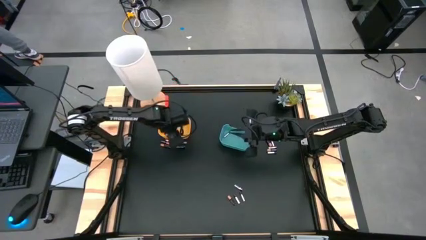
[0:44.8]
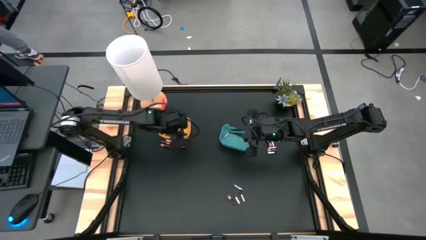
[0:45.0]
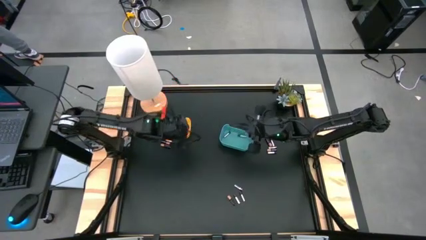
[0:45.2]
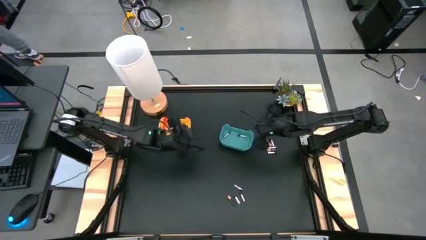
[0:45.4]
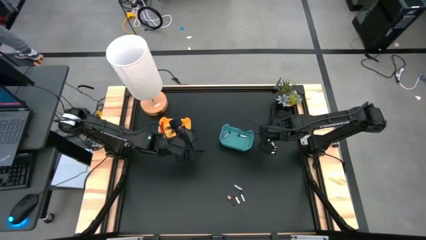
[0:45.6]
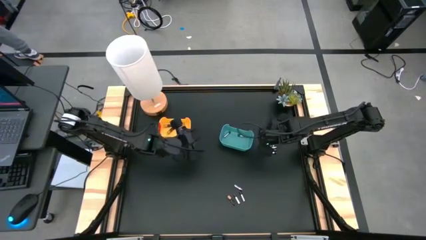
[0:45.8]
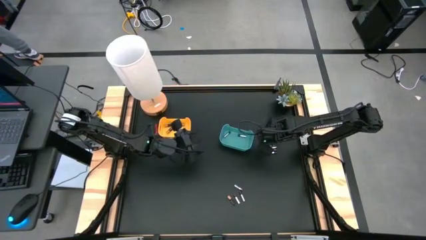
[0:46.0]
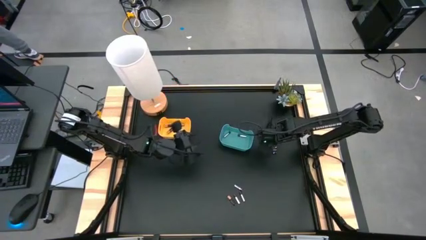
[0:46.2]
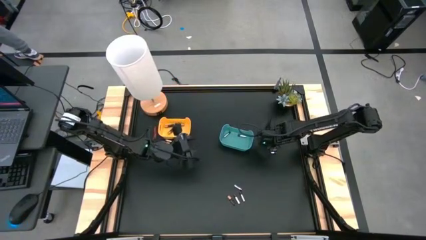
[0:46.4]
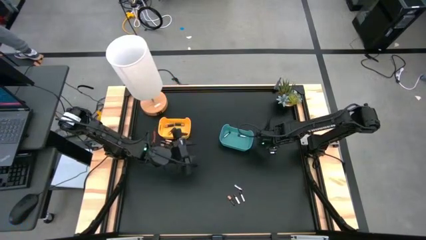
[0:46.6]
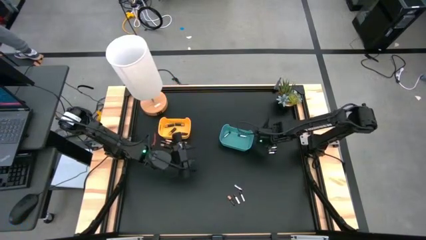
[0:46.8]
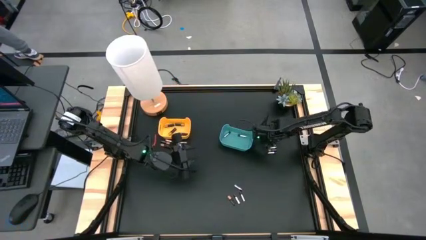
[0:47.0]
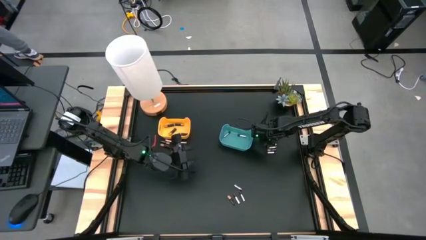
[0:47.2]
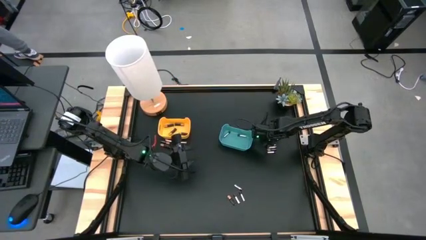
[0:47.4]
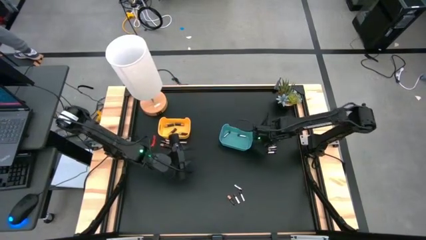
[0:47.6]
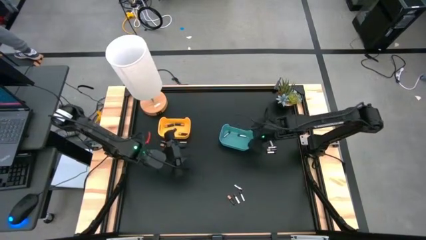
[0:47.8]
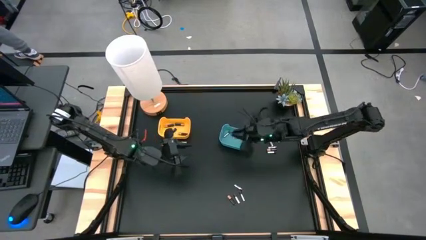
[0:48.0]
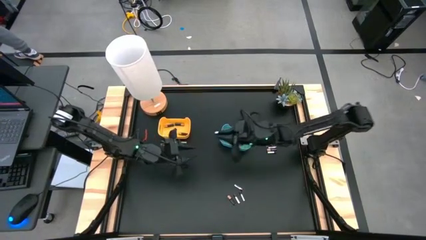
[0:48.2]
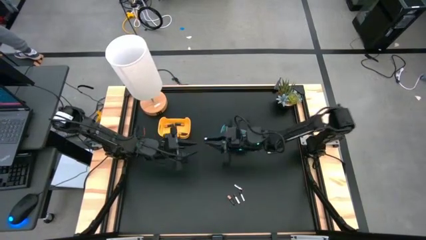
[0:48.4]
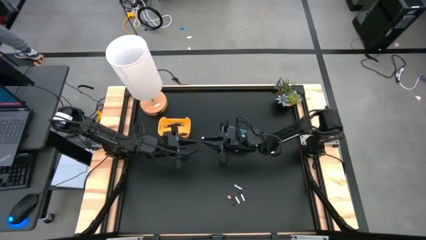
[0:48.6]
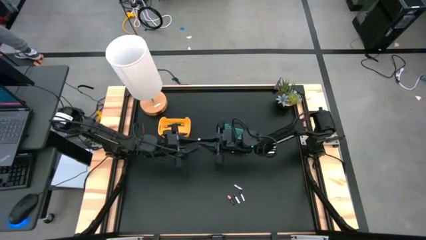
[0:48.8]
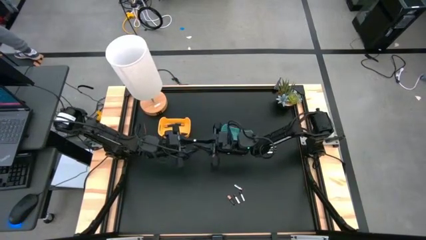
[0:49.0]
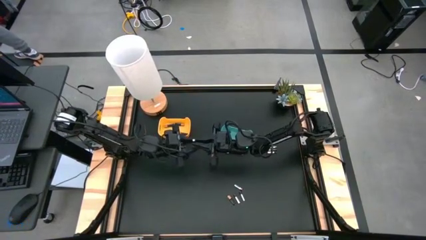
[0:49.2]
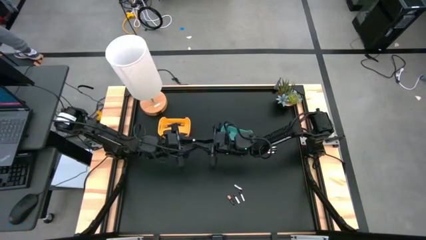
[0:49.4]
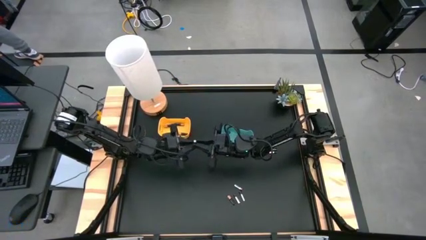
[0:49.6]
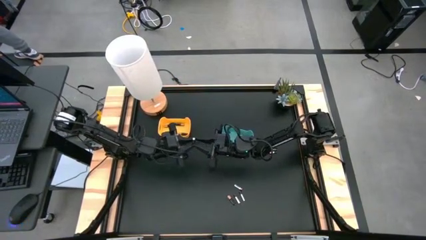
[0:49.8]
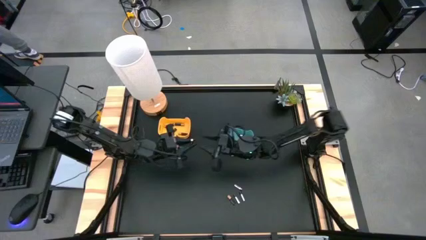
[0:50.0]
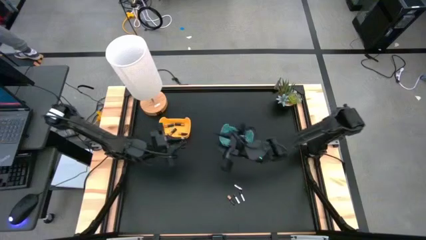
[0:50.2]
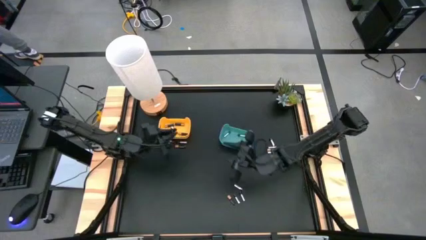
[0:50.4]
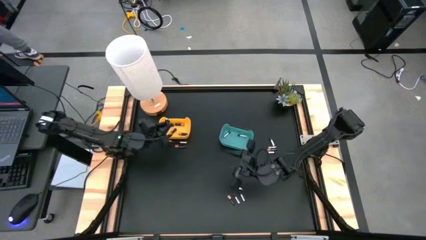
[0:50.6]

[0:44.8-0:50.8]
Task: Sort batteries
Put the black battery into the yellow bin

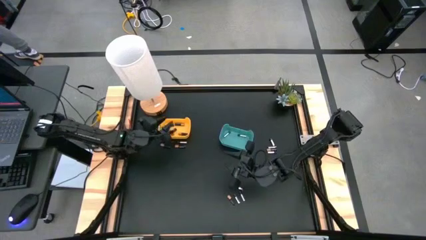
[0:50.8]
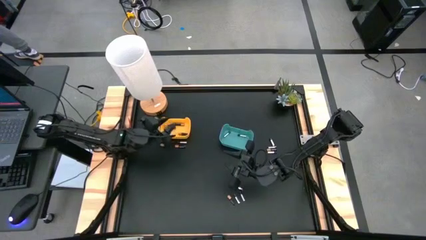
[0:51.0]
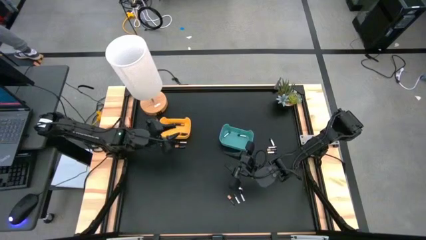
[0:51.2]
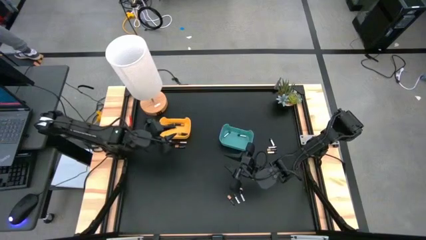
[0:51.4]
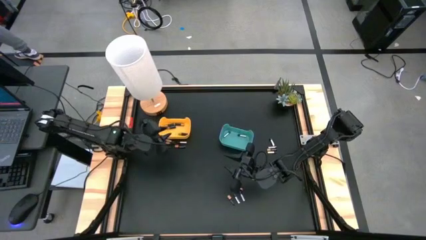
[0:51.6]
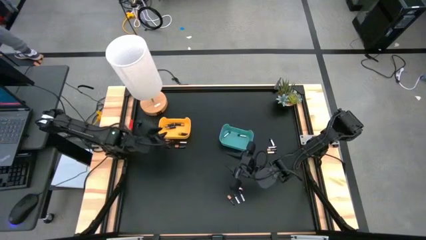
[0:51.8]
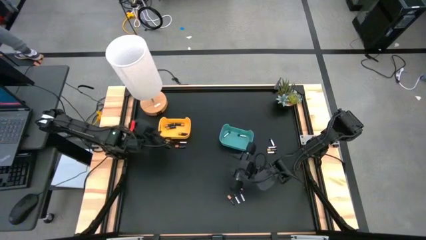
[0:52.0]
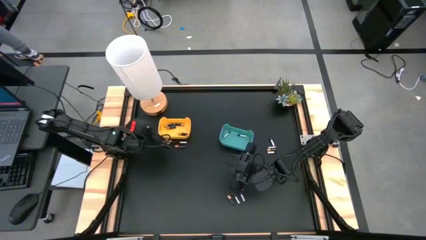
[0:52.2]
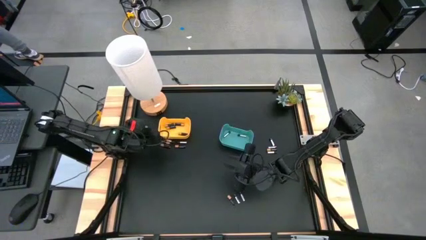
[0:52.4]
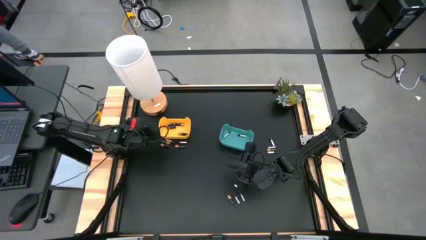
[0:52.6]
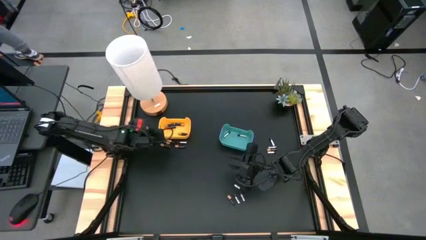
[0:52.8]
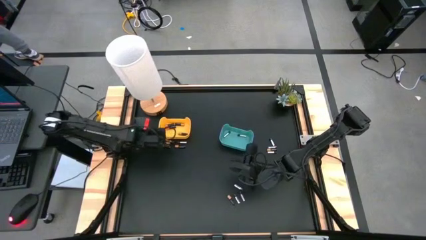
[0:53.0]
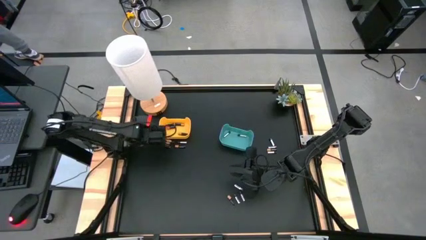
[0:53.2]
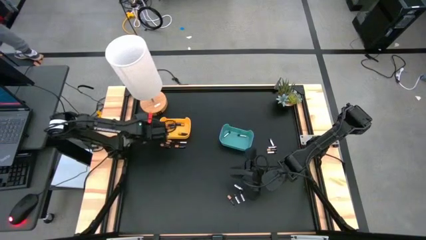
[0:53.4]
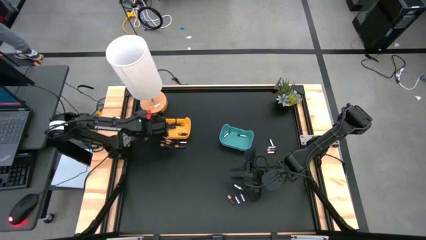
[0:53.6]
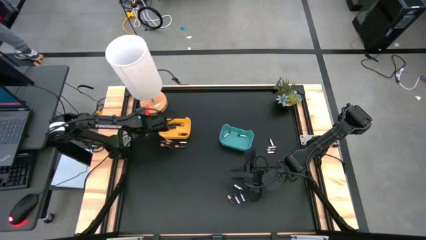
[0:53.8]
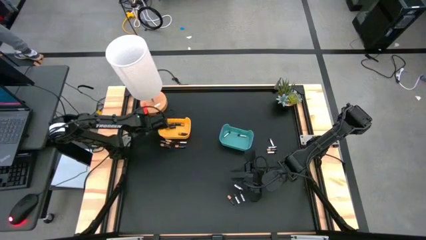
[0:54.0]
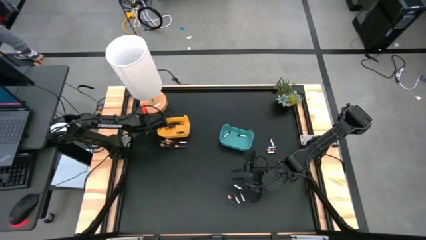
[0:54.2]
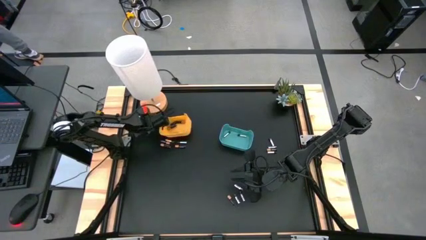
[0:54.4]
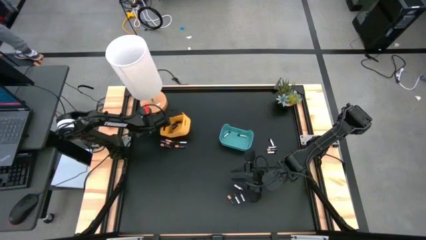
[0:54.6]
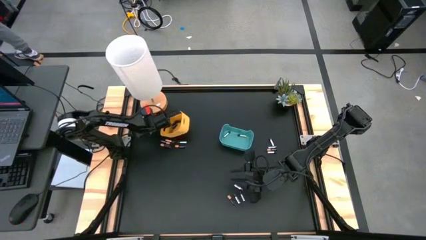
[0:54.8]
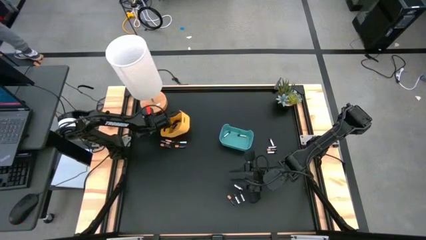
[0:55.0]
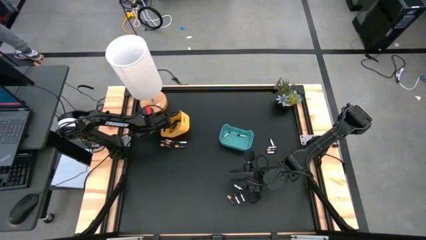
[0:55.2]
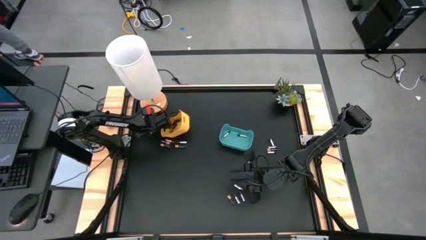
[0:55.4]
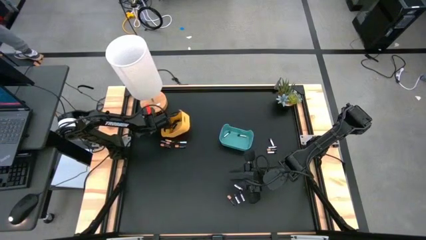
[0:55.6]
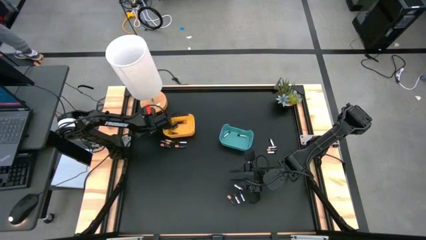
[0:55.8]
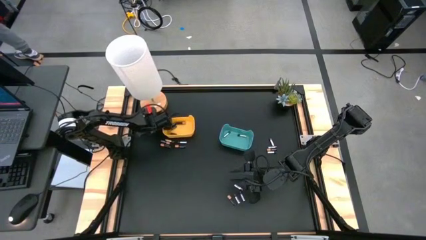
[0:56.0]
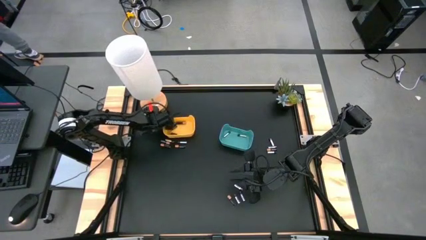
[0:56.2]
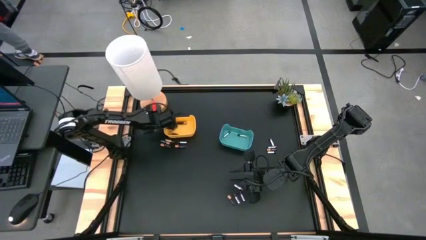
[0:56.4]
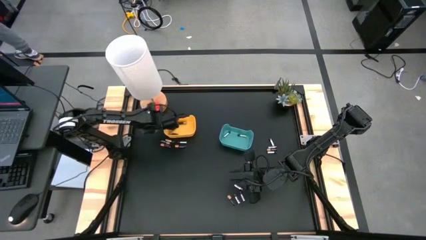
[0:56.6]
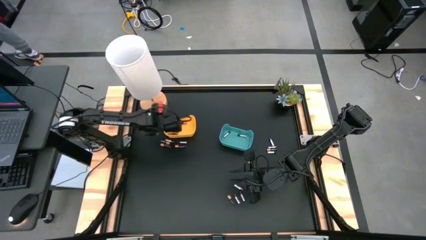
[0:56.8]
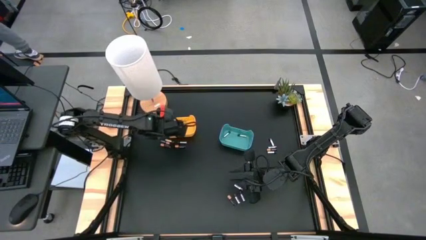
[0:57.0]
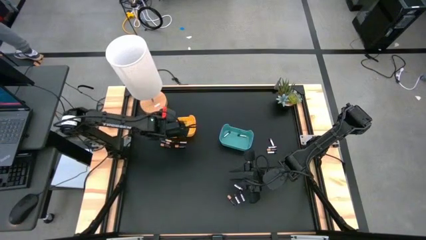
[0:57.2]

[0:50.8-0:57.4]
Put the black battery into the yellow bin

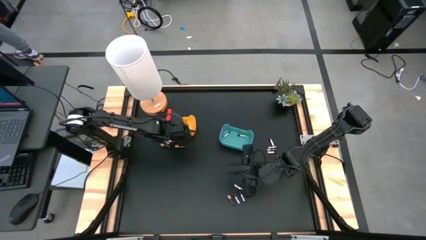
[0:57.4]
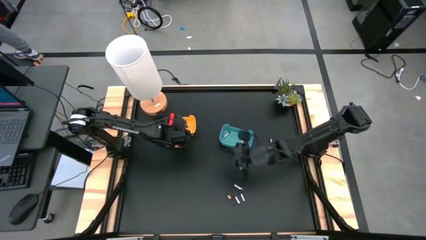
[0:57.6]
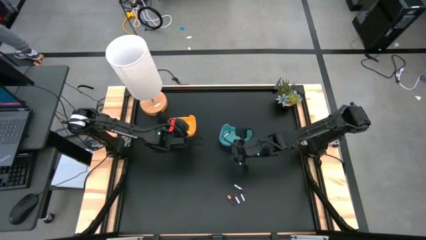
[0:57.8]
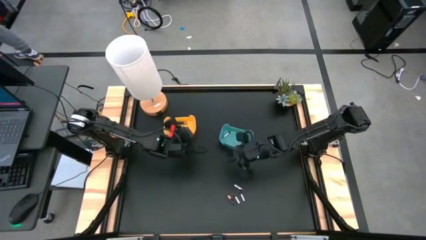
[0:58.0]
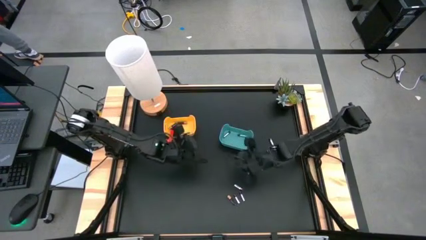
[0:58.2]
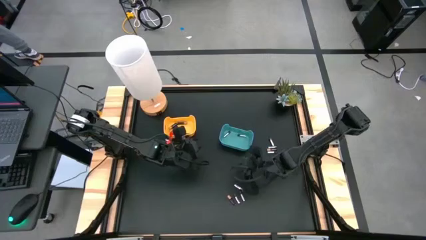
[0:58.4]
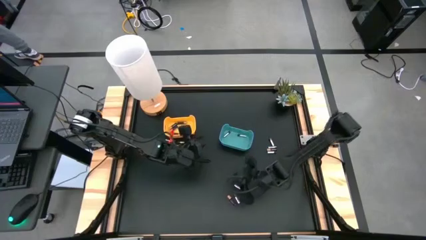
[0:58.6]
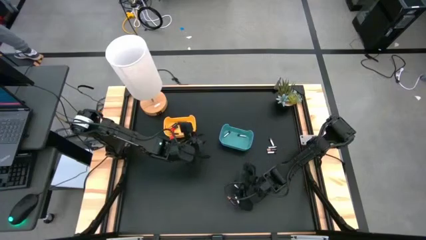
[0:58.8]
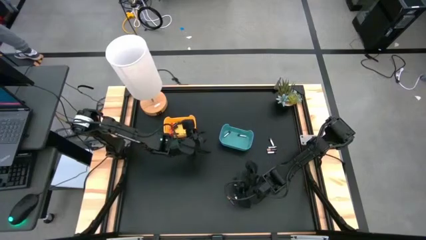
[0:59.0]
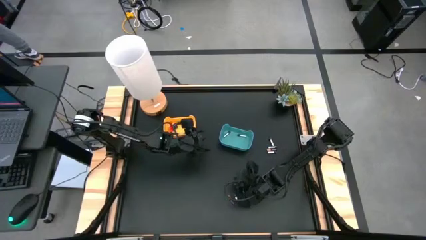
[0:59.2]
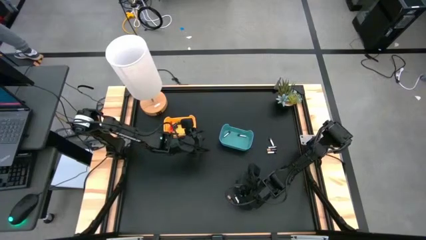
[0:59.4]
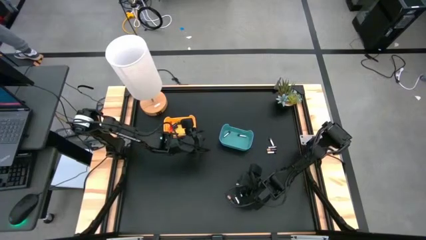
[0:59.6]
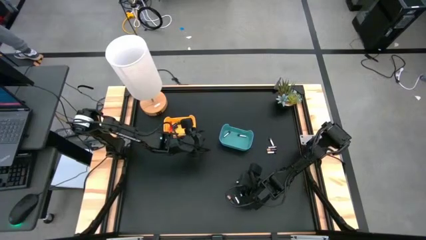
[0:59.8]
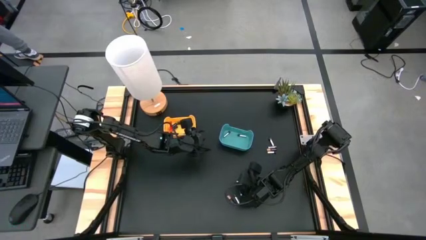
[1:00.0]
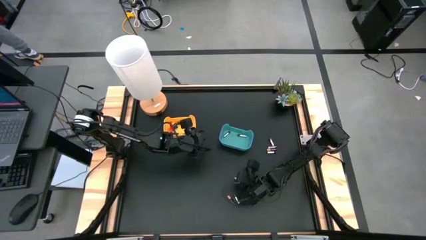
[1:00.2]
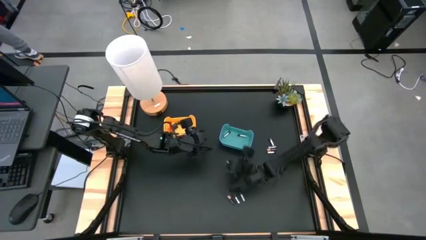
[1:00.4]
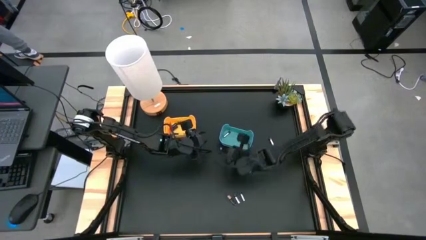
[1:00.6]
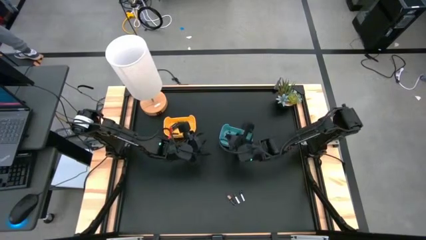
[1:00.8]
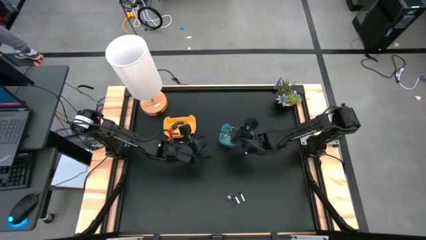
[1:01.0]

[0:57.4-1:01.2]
Put the silver battery into the blue bin
